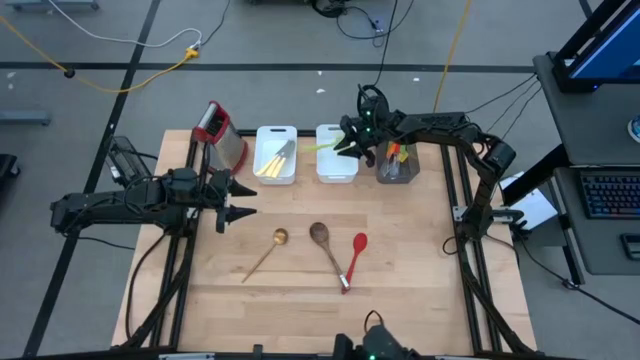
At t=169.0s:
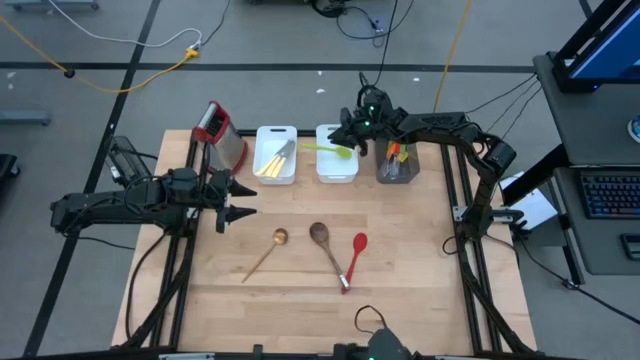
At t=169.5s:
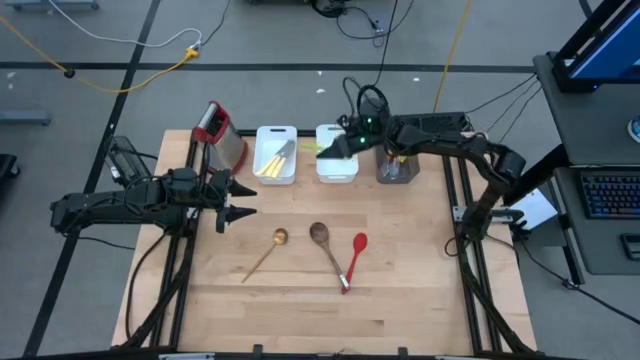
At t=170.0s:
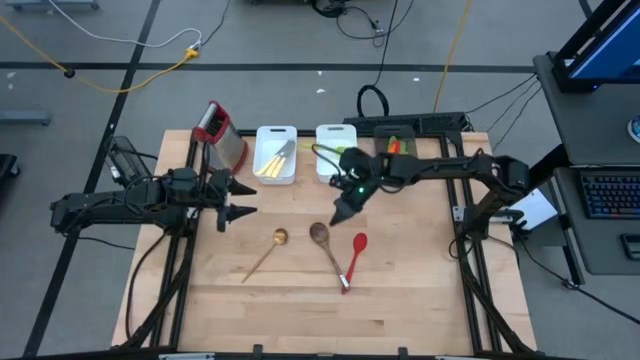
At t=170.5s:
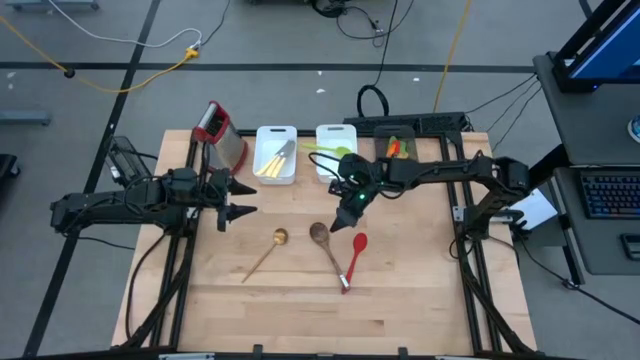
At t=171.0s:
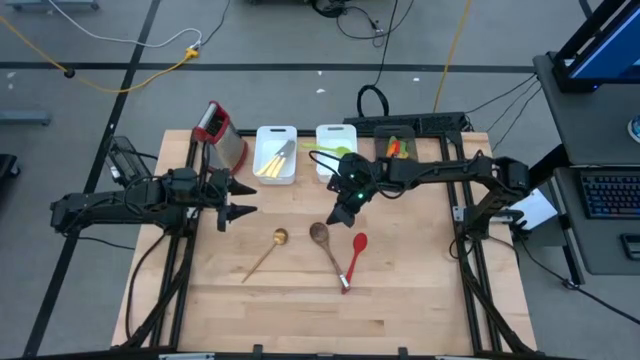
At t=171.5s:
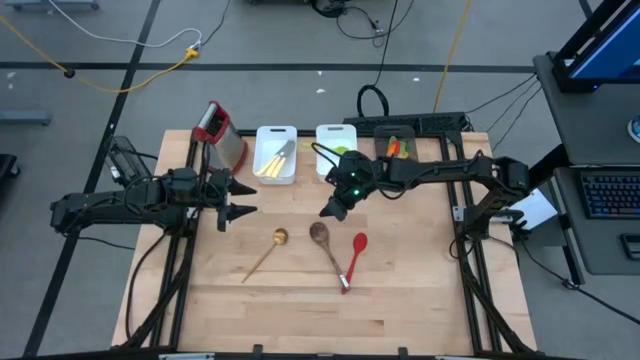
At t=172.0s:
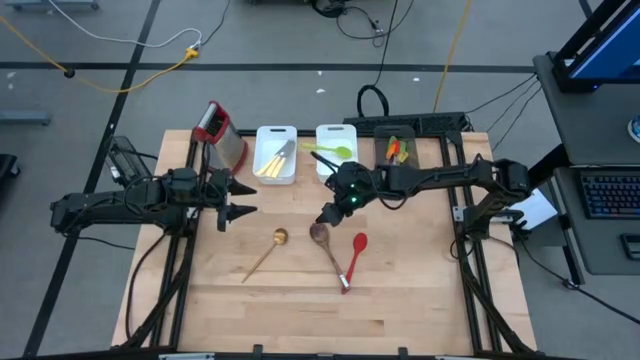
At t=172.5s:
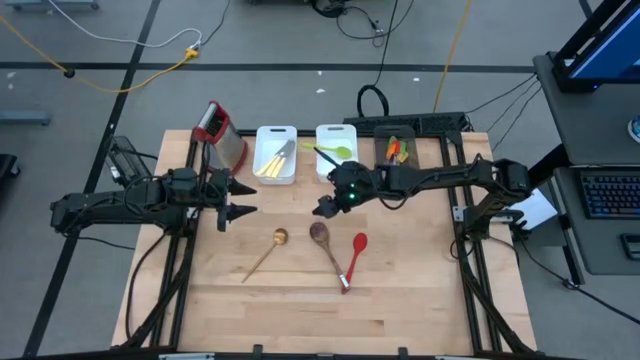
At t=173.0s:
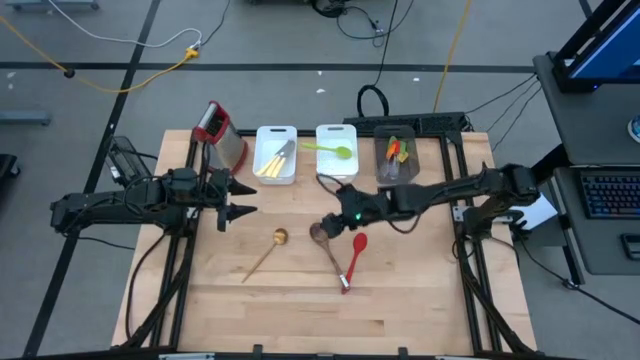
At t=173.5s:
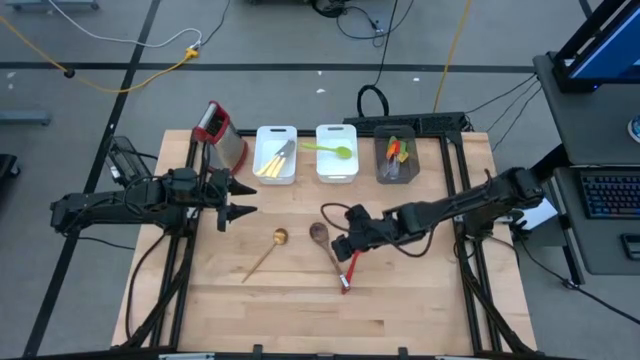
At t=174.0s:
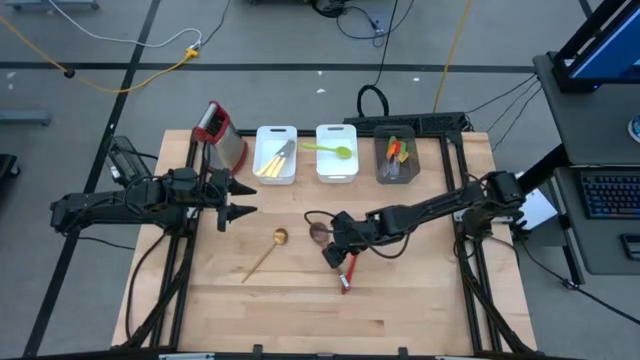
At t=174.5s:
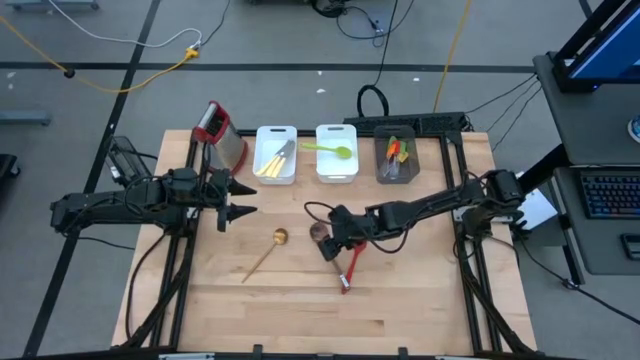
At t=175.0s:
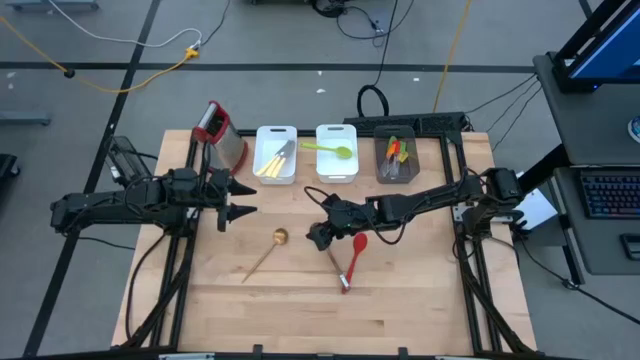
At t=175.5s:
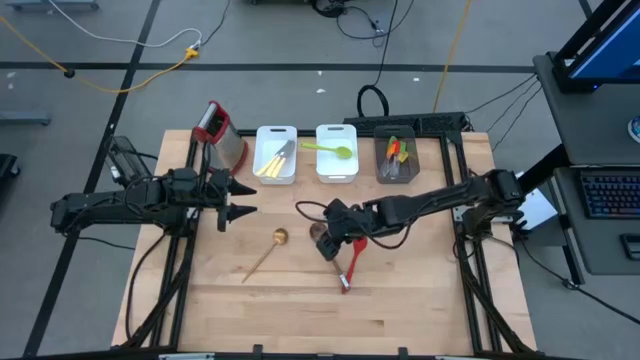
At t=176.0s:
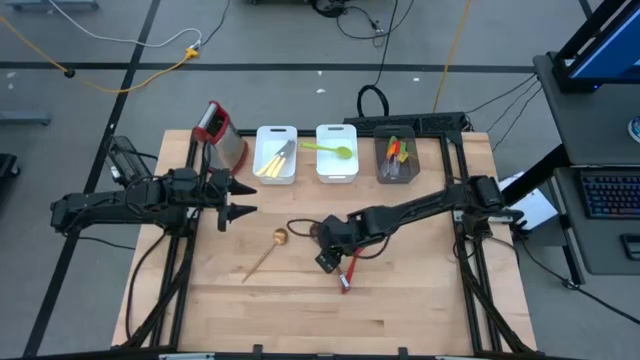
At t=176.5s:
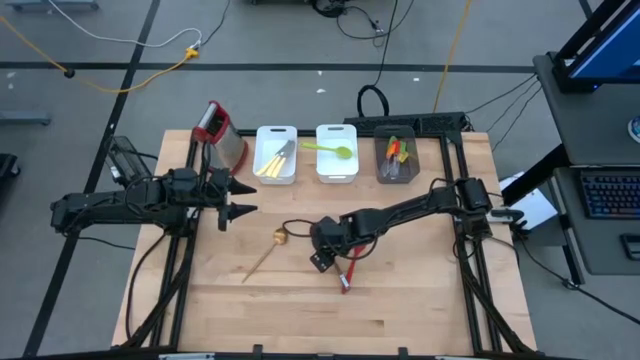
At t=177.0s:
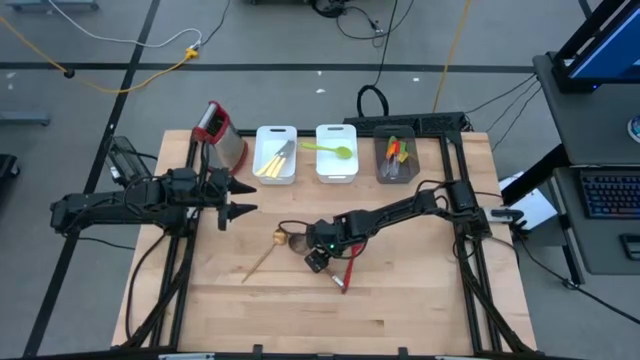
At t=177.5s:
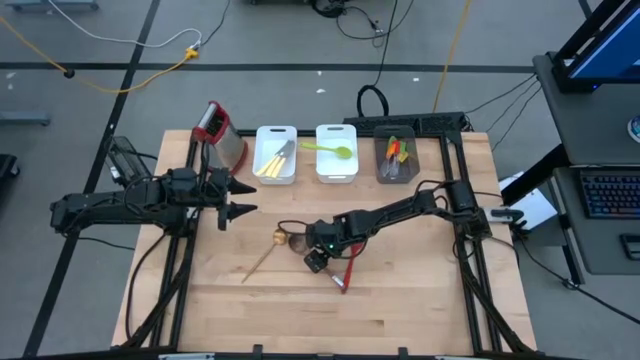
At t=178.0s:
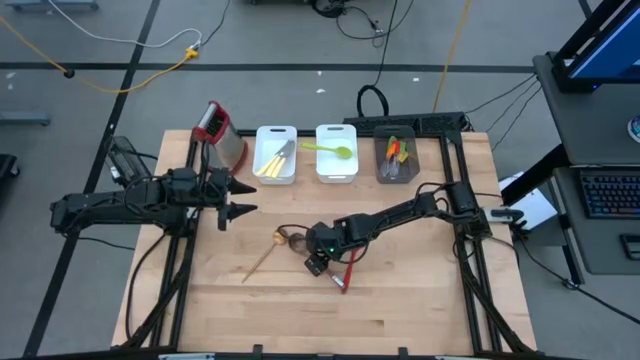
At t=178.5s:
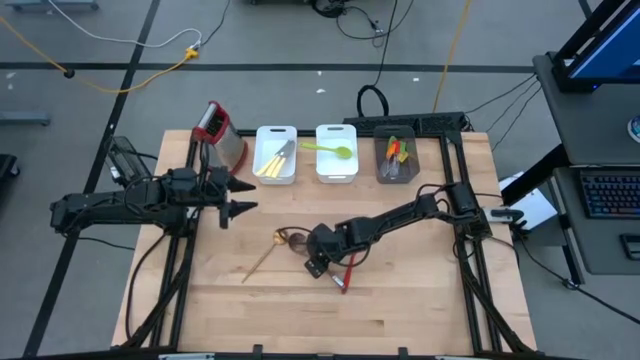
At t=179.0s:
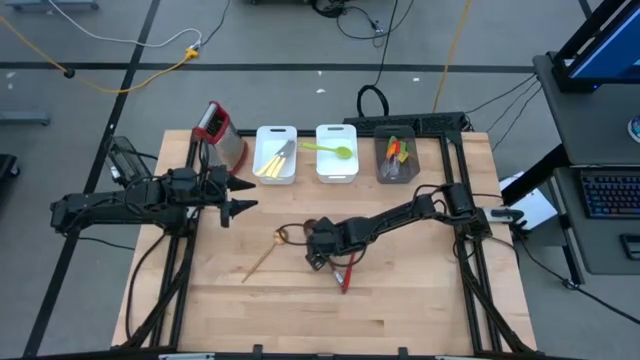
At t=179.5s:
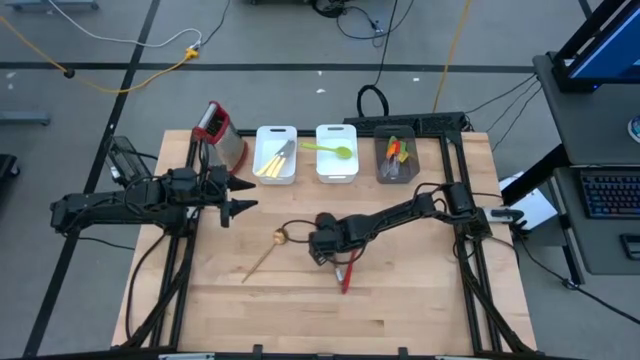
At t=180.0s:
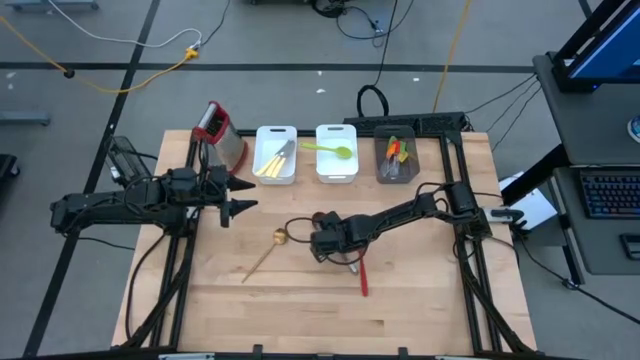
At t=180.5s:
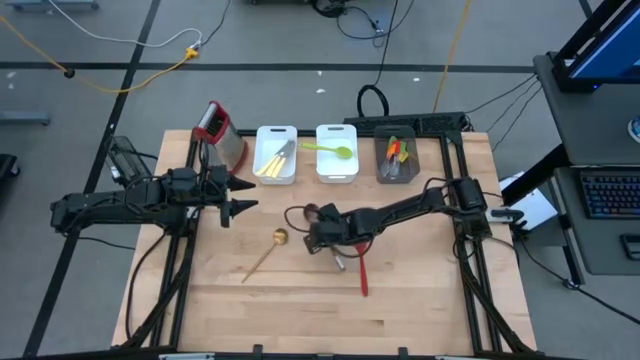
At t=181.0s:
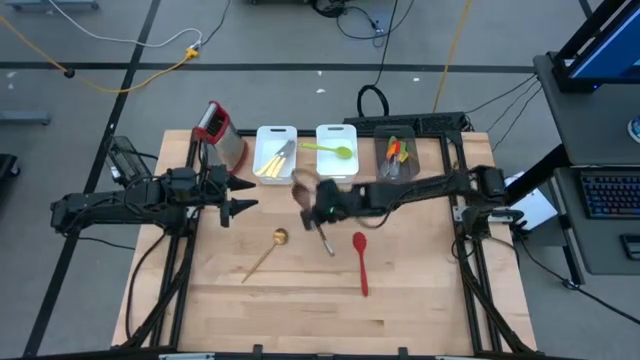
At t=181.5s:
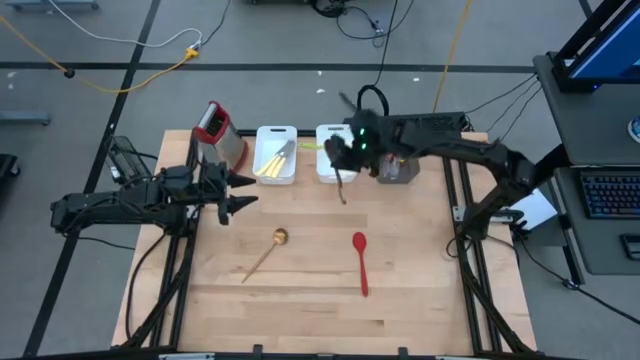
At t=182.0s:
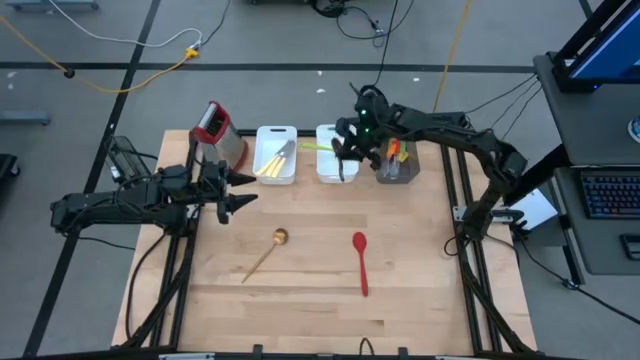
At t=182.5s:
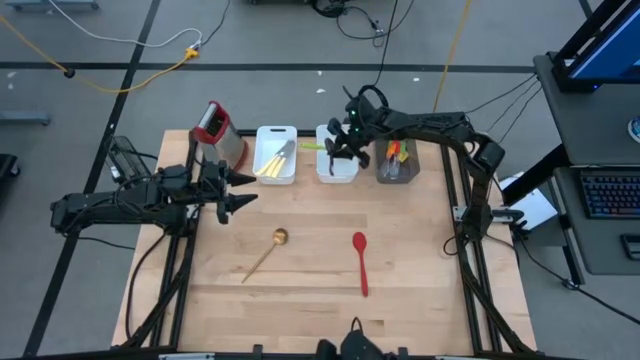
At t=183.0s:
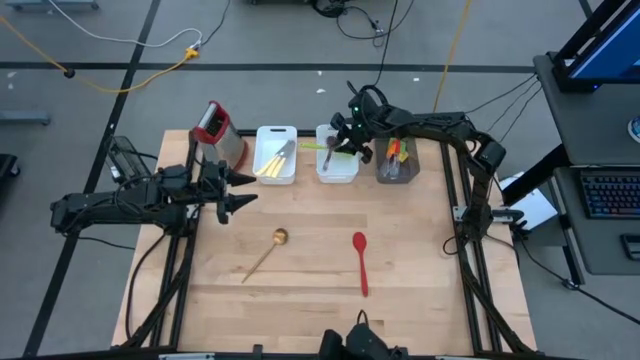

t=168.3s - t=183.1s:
Task: Pick & Place Kitchen Items
Put the brown serving spoon into the right white bin

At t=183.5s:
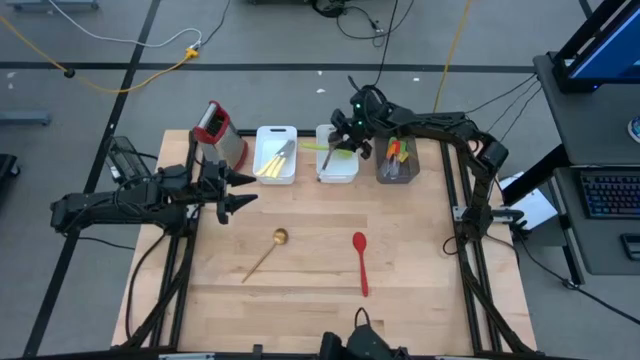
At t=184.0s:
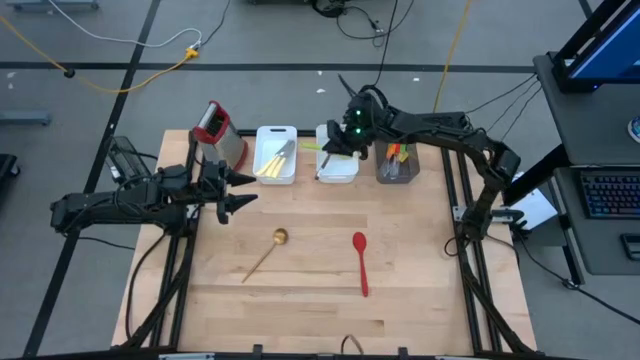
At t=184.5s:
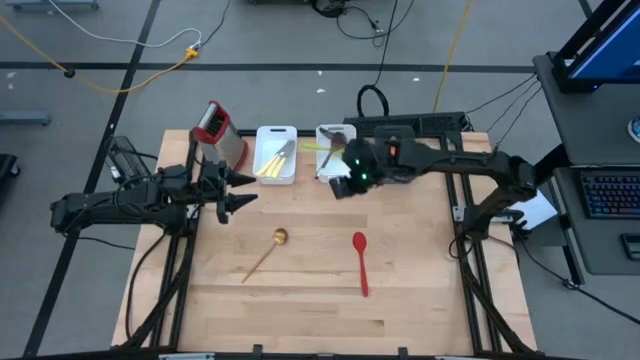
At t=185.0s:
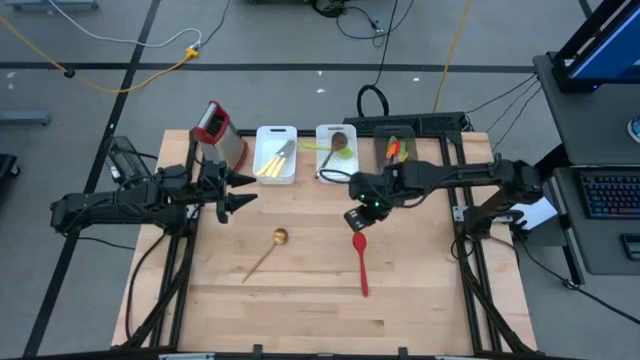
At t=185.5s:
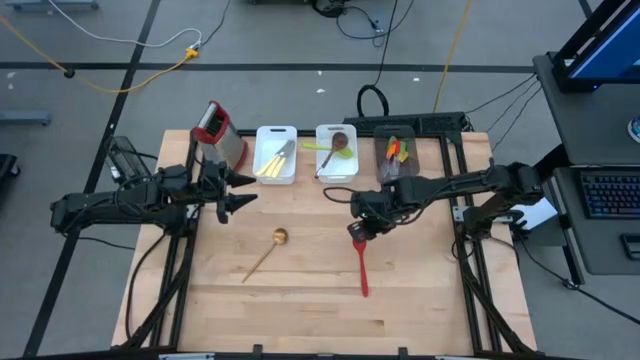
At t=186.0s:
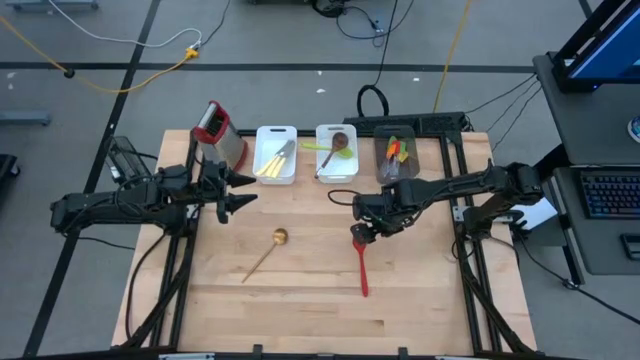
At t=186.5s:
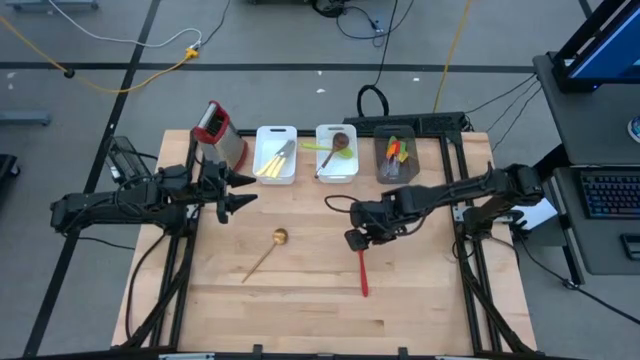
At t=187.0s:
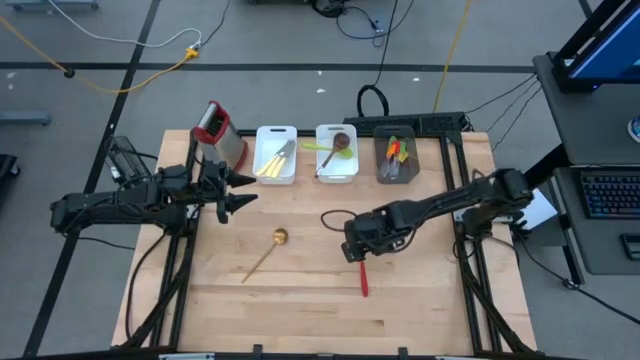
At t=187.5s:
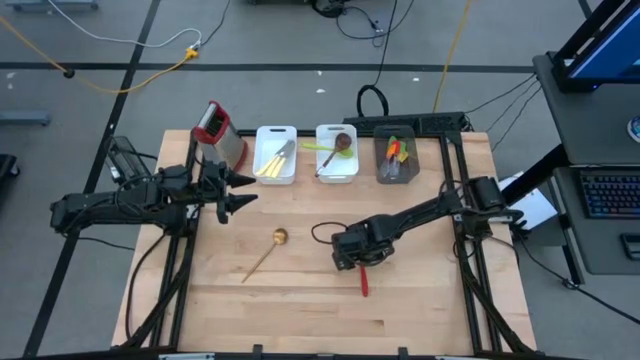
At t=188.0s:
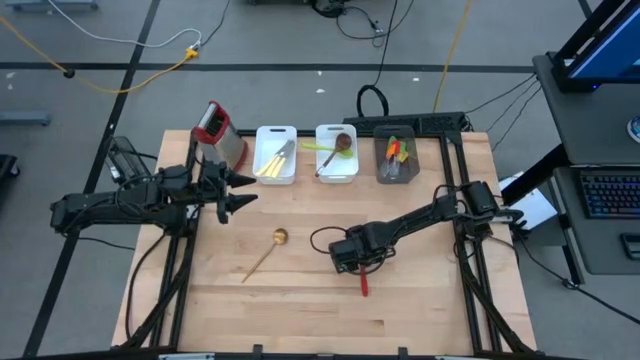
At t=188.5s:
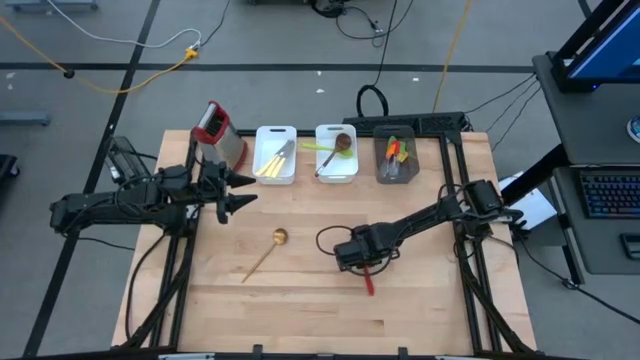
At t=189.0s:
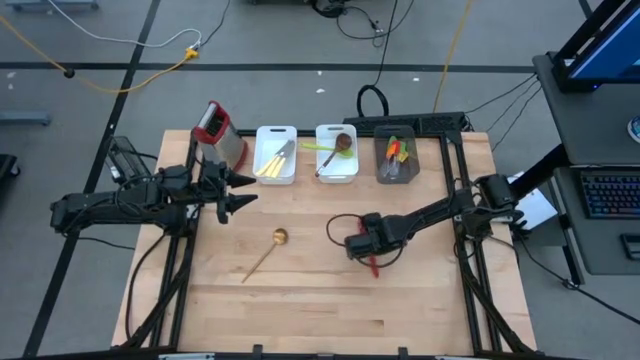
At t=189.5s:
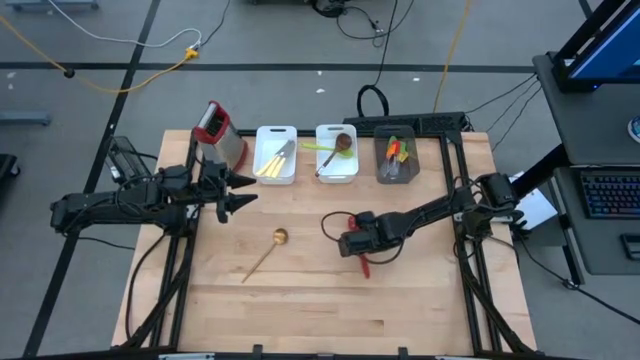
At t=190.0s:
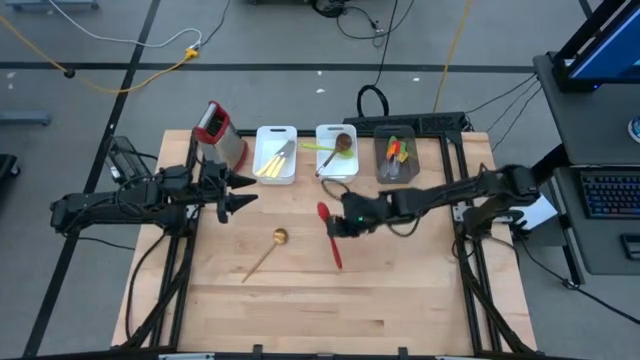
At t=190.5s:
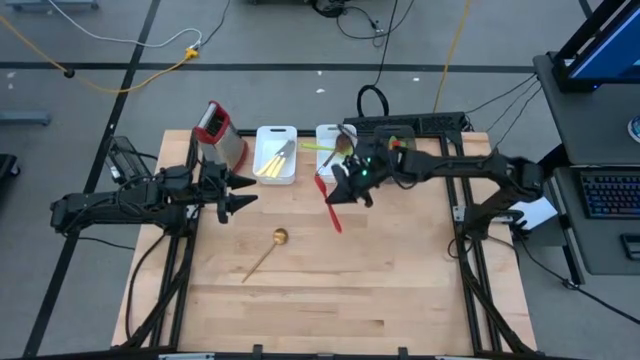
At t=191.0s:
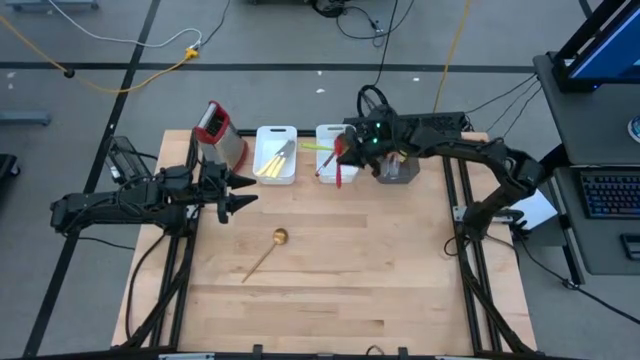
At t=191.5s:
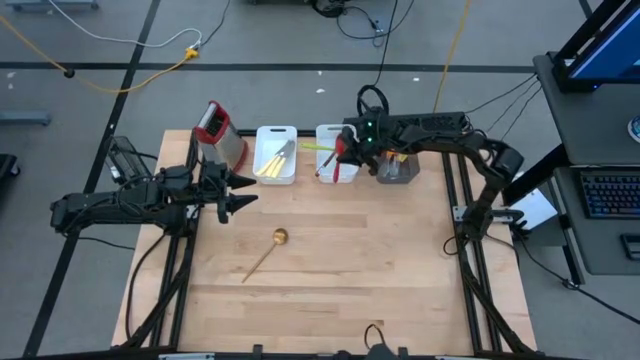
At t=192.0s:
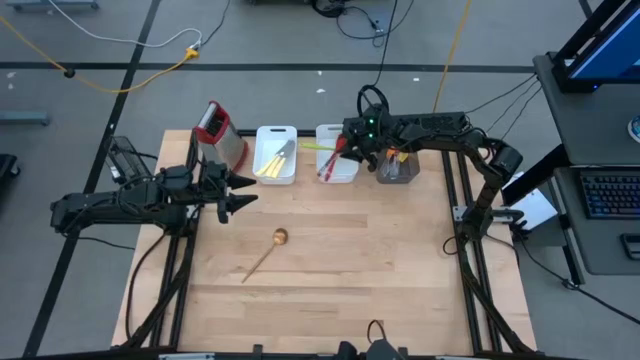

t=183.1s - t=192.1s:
Put the red serving spoon into the right white bin
